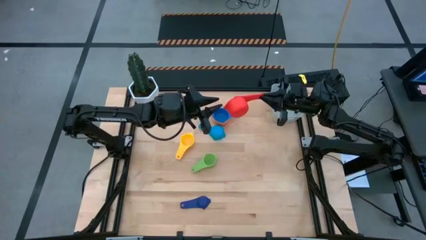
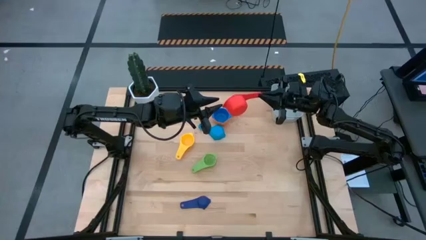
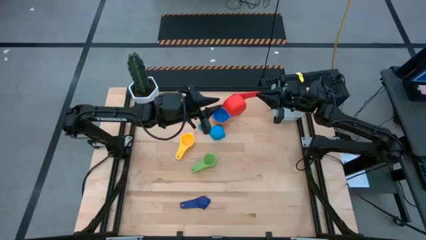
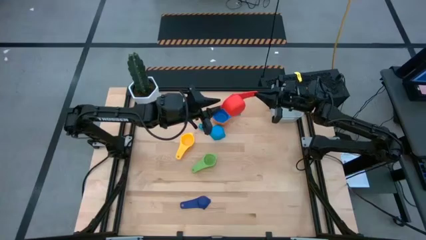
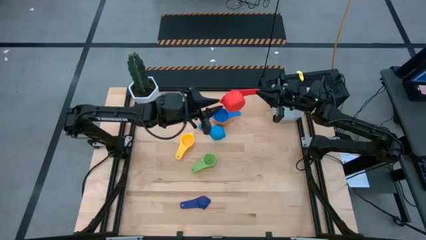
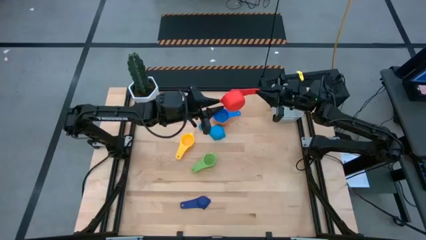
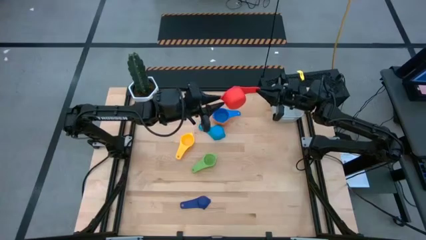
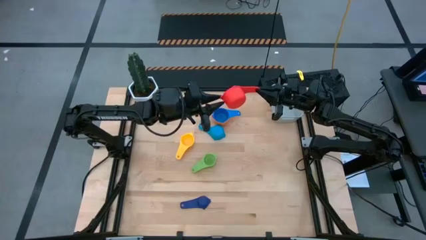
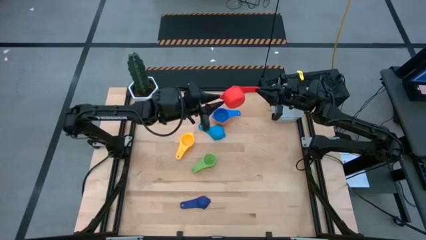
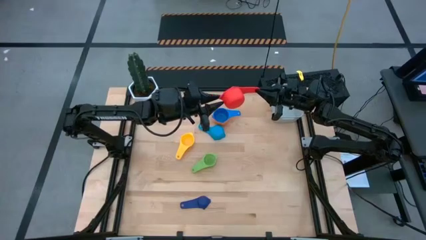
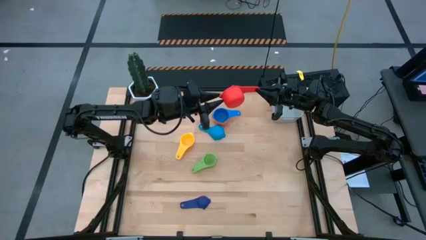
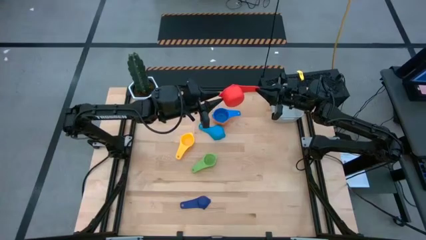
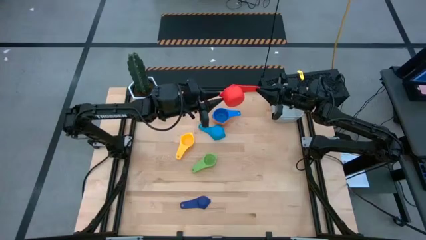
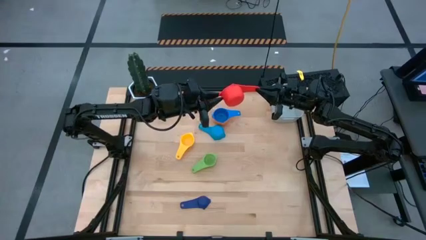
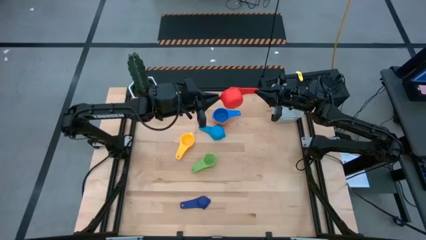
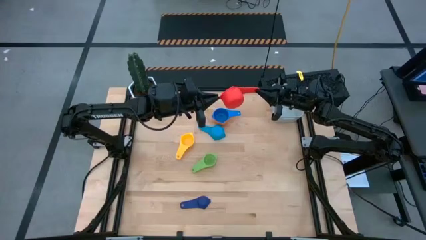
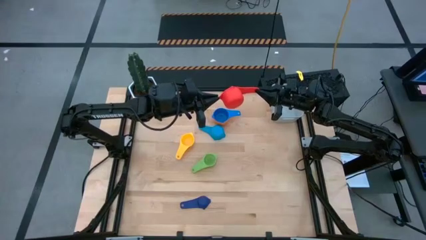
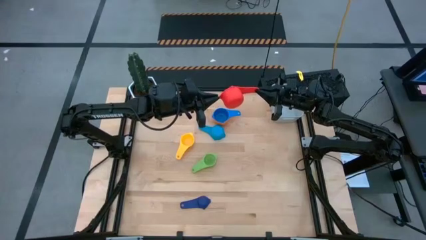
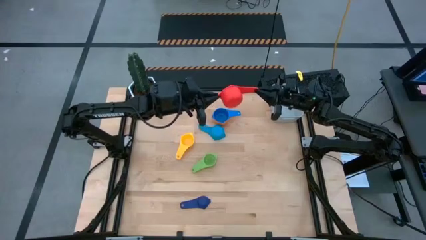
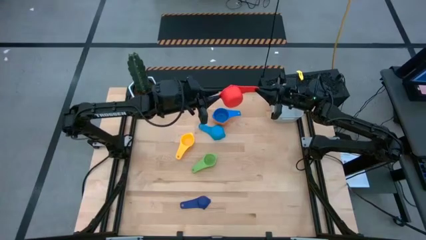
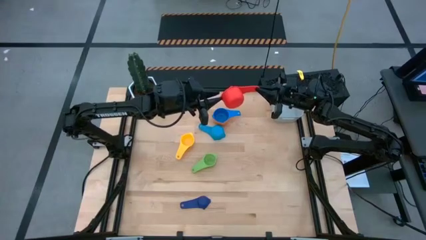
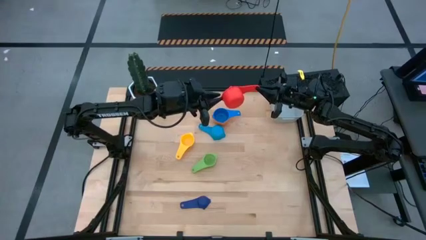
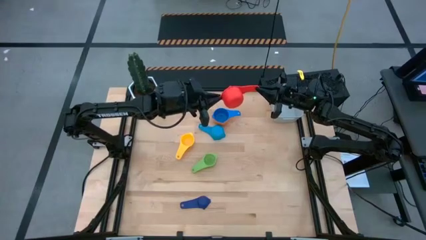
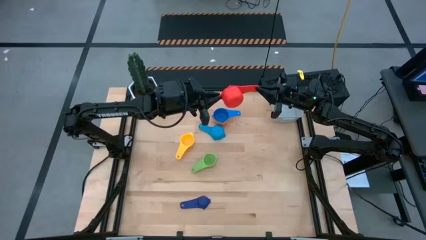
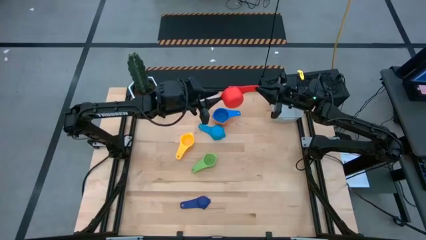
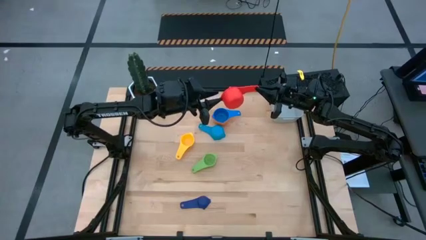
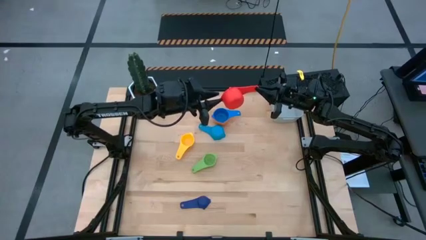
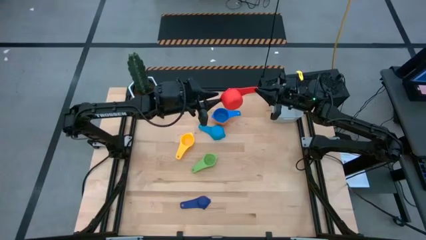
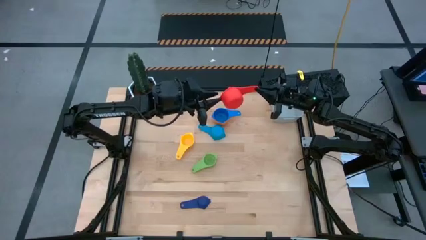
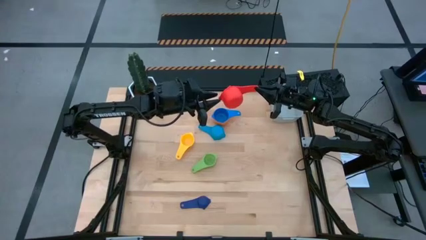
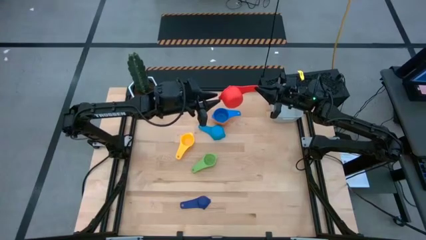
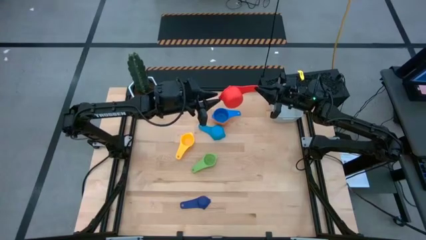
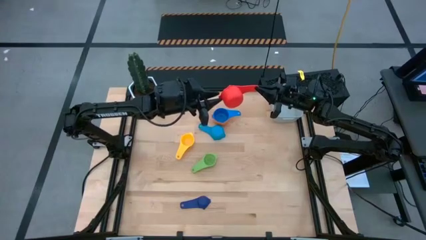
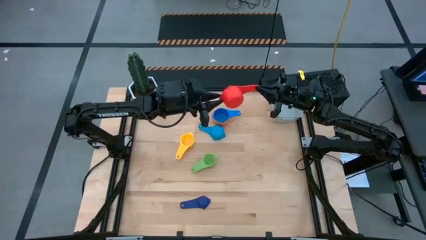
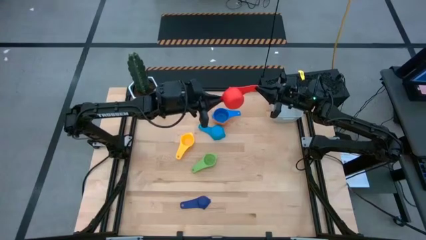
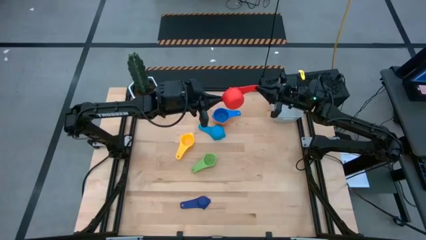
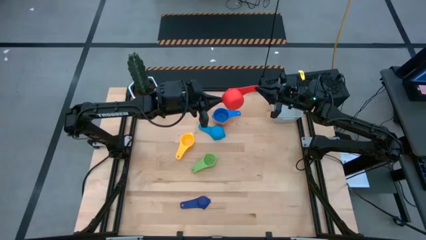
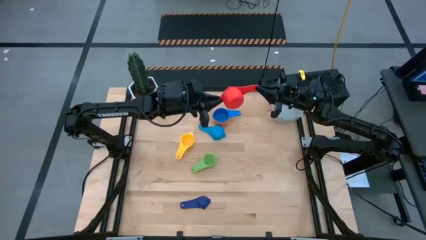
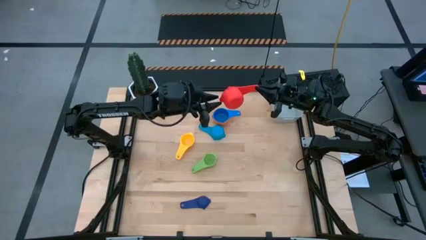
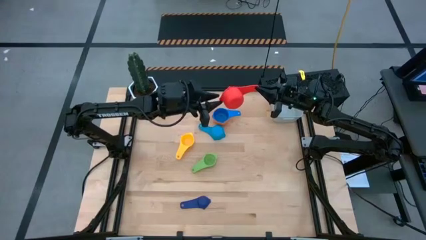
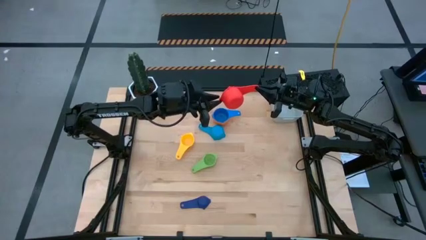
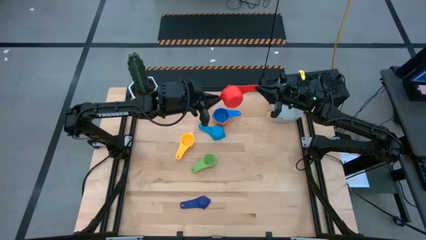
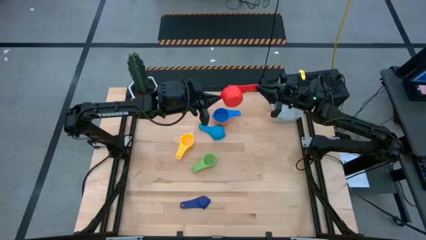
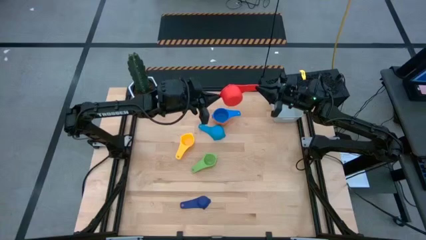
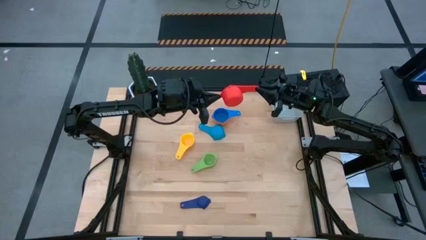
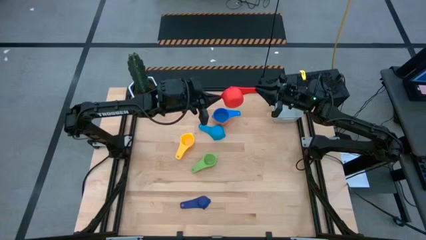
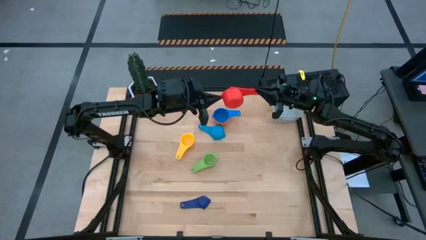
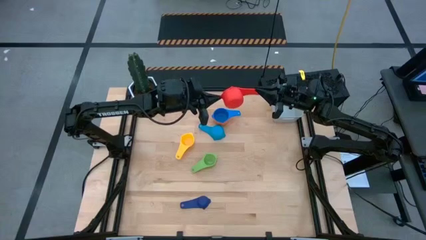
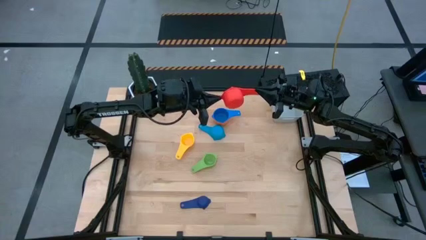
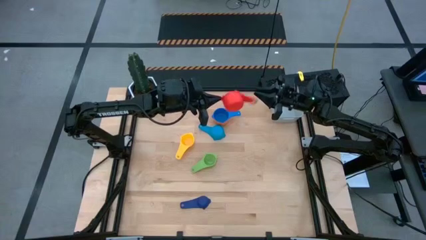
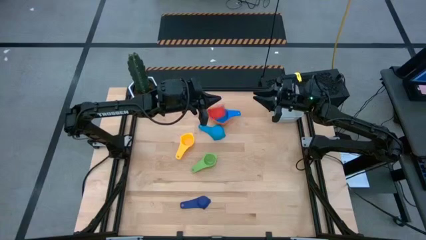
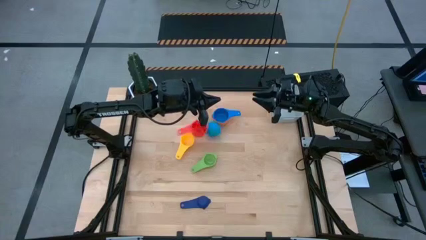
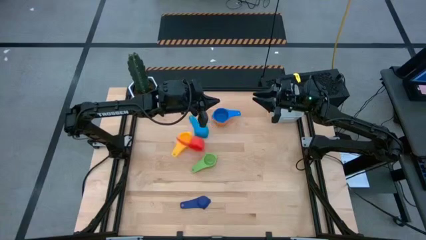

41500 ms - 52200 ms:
Task: Nest measuring cups in basket
Stack the red measuring cup on top of the blue measuring cup

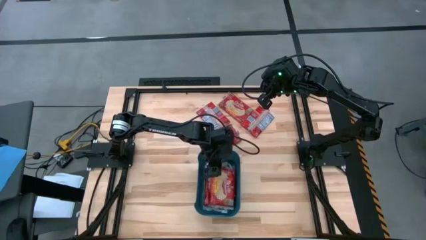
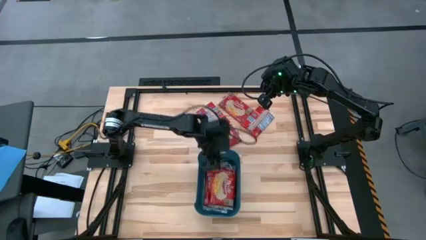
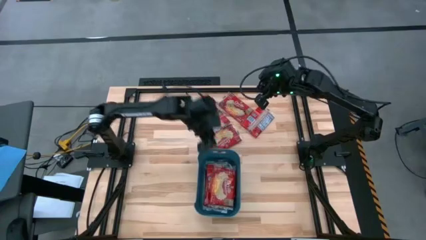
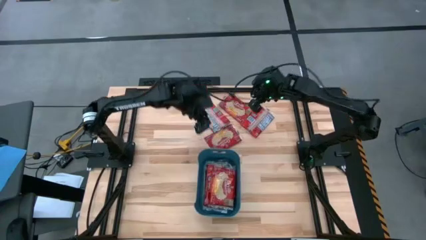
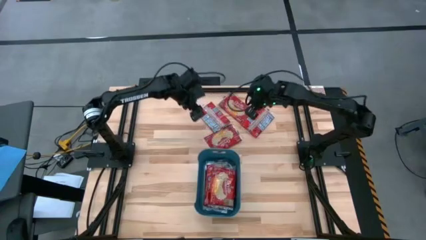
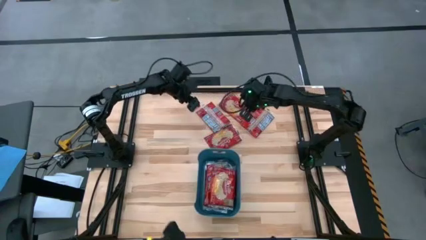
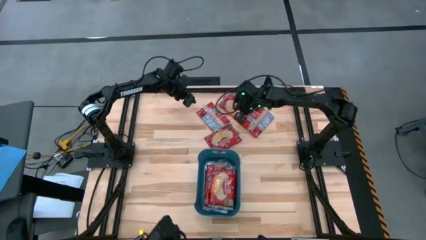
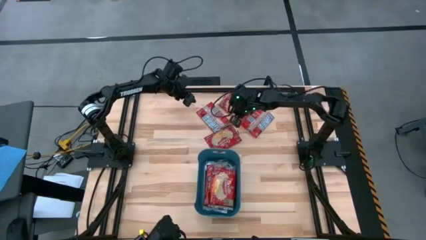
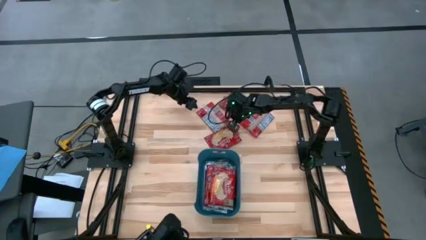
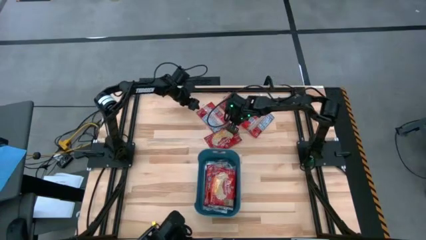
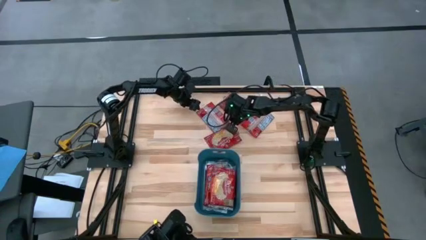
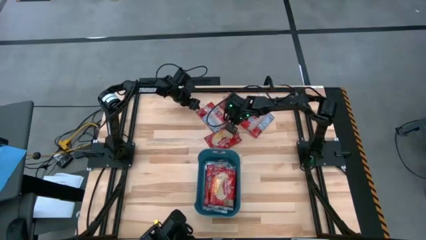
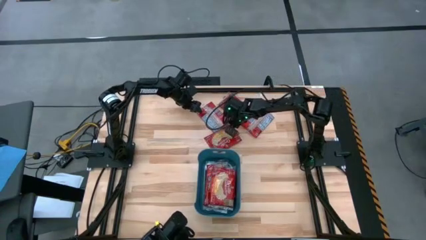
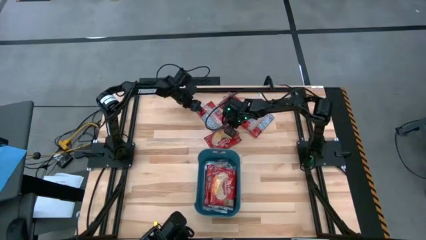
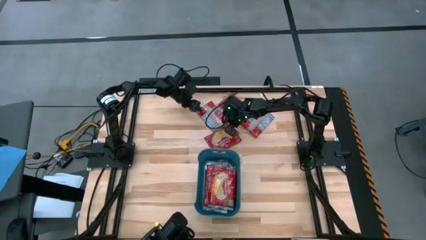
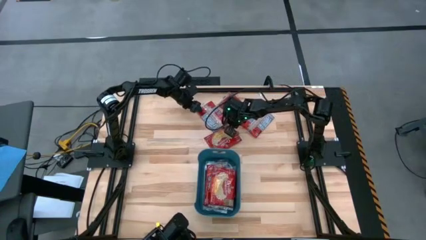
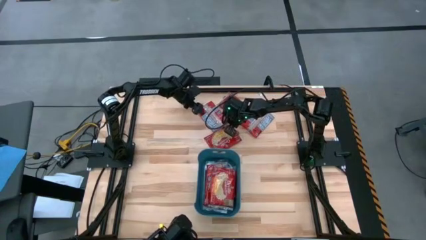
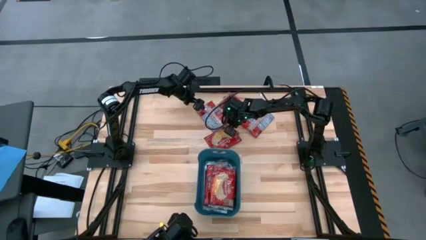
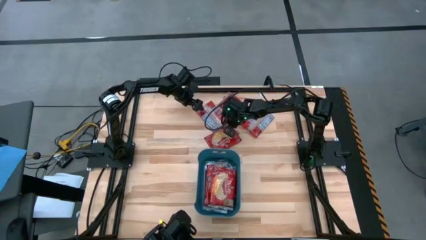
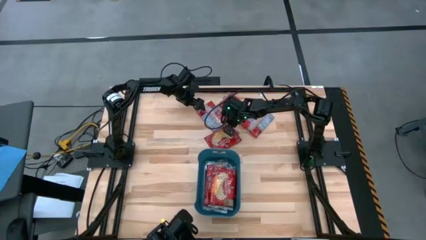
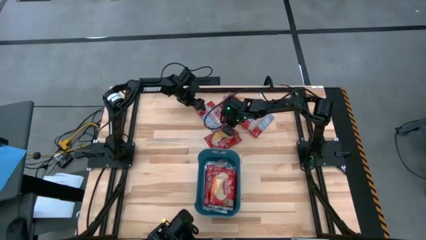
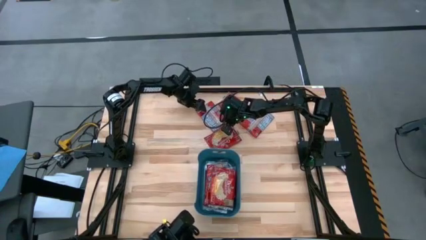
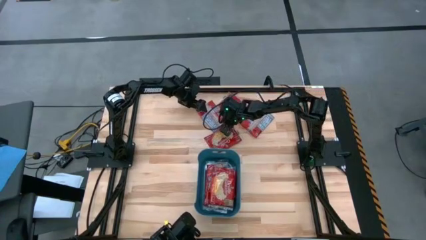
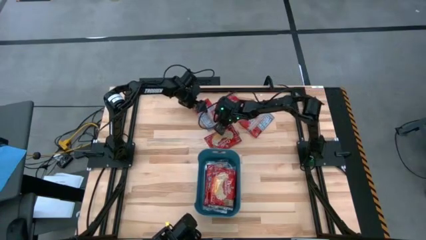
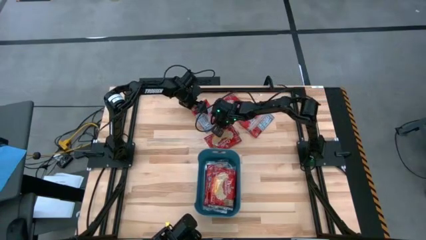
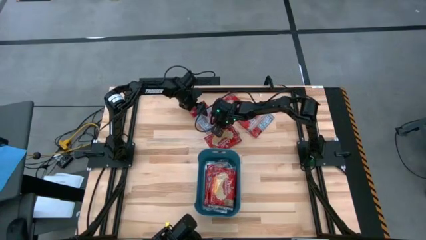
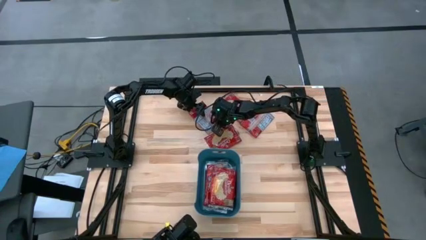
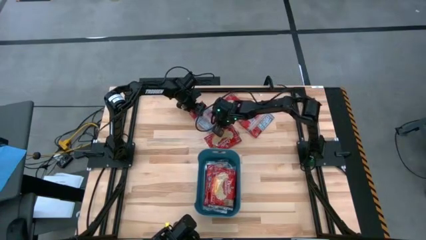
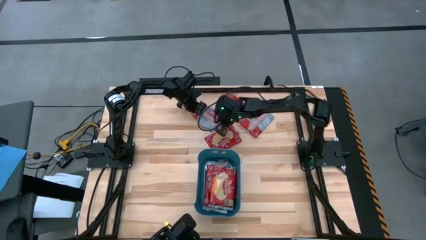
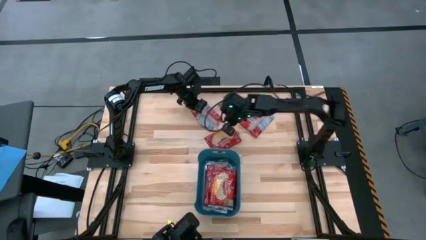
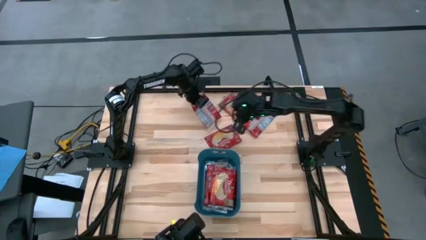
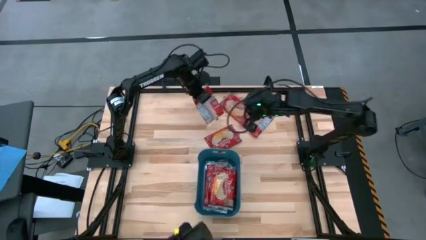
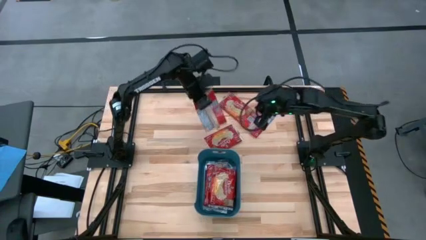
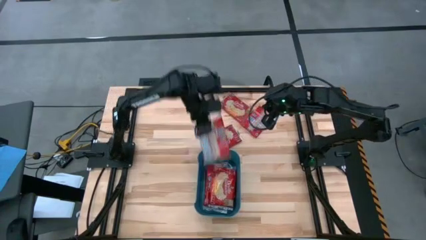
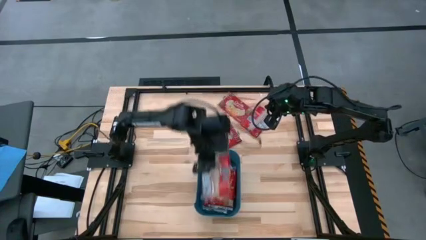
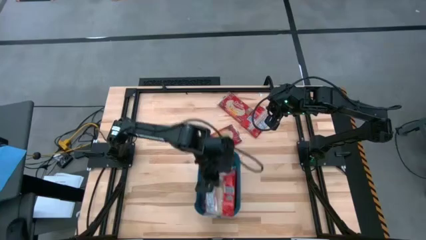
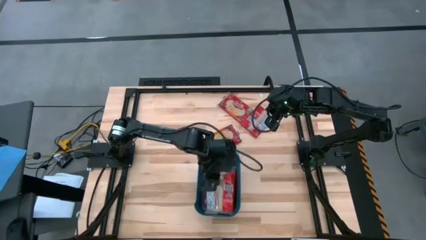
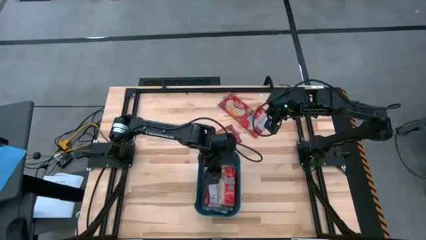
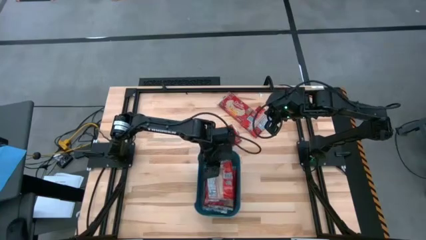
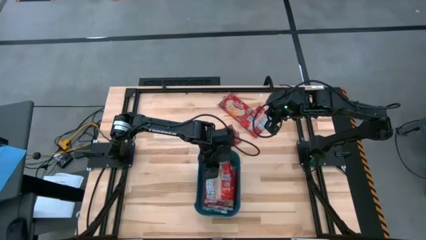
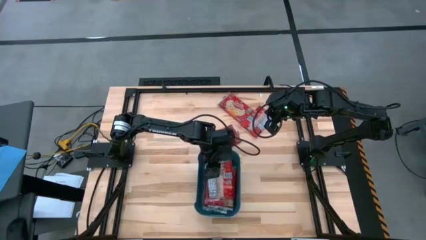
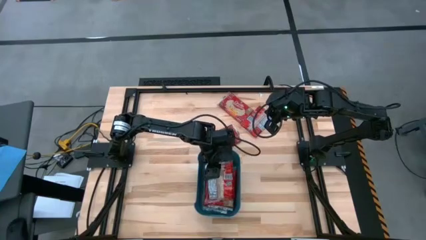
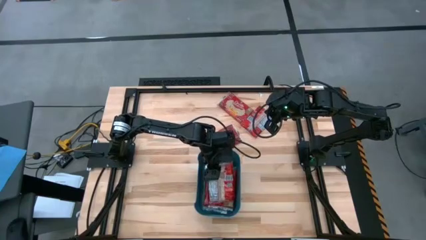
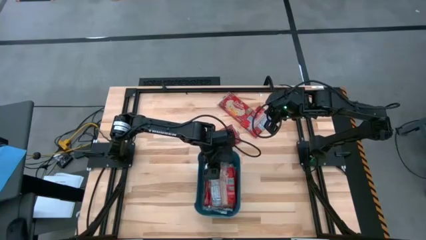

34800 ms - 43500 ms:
Task: Sort popcorn bags into baskets
Put the red popcorn pack into the blue container
